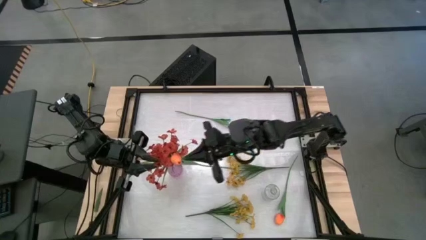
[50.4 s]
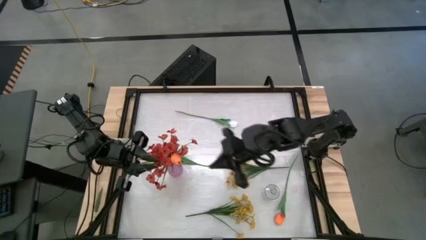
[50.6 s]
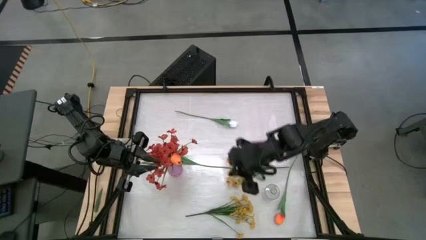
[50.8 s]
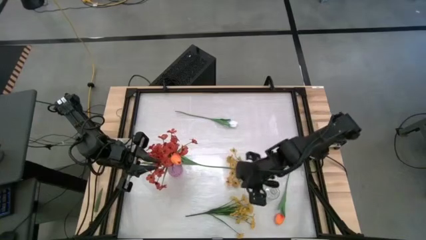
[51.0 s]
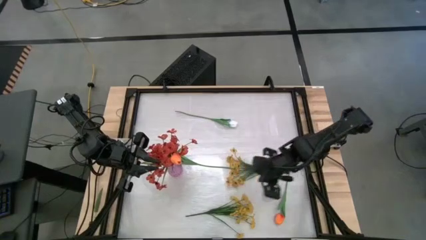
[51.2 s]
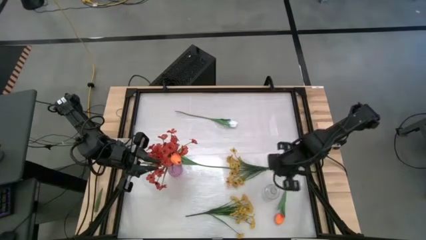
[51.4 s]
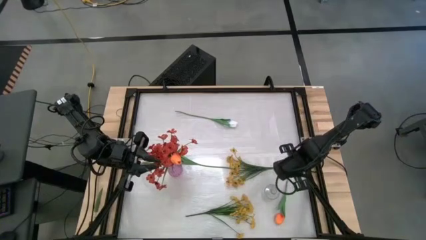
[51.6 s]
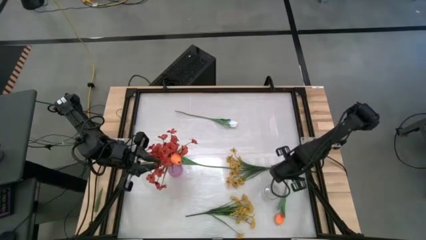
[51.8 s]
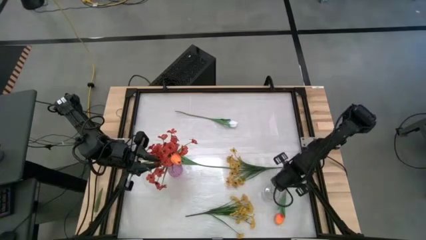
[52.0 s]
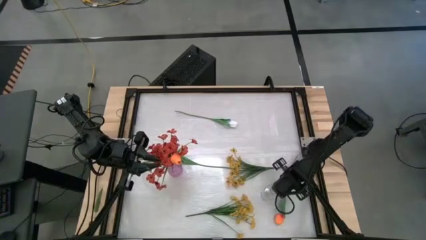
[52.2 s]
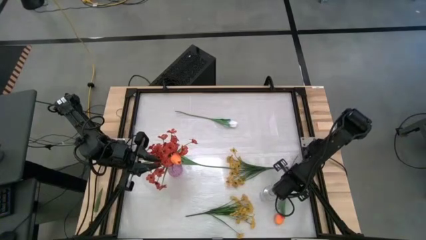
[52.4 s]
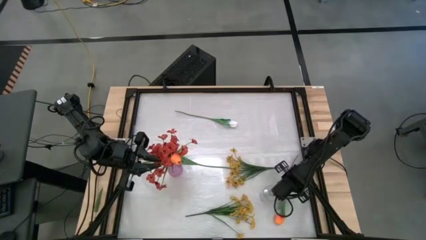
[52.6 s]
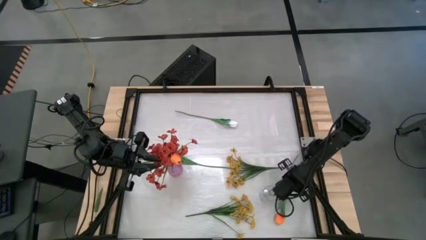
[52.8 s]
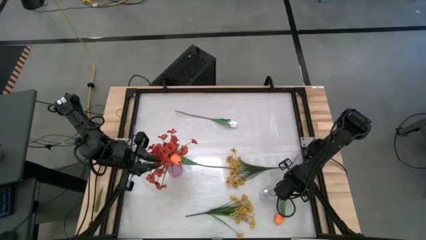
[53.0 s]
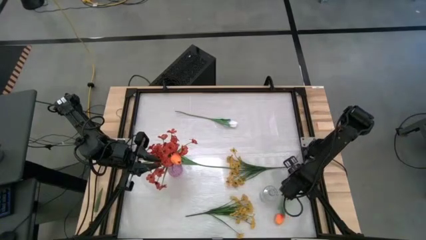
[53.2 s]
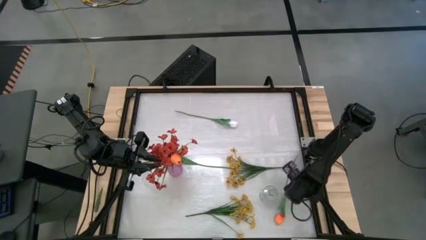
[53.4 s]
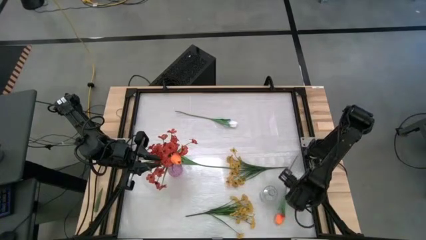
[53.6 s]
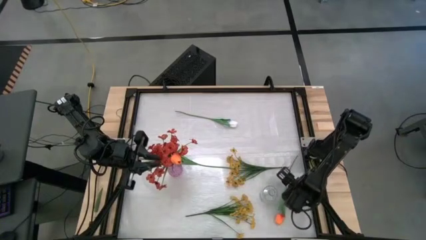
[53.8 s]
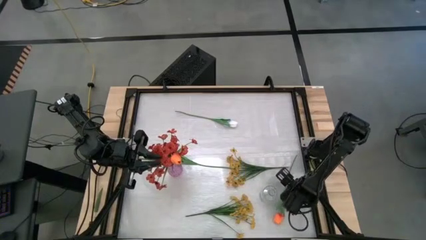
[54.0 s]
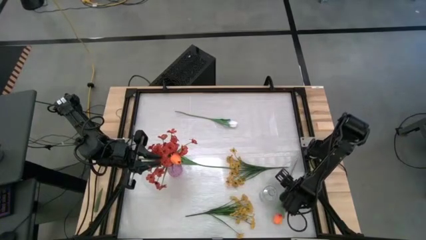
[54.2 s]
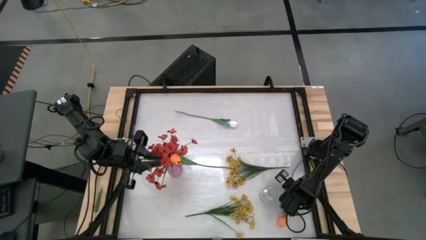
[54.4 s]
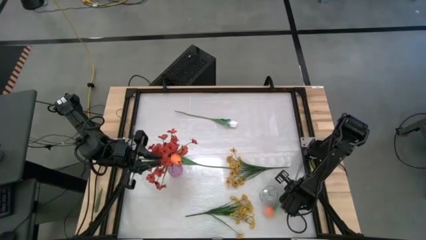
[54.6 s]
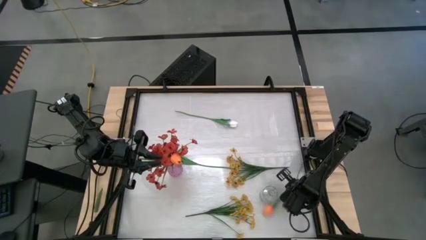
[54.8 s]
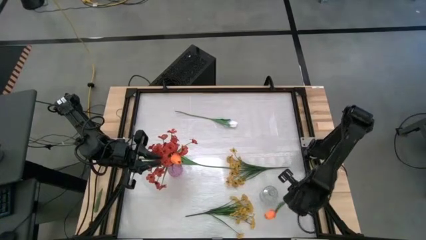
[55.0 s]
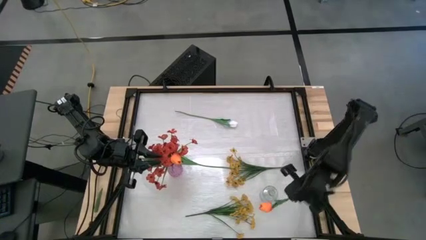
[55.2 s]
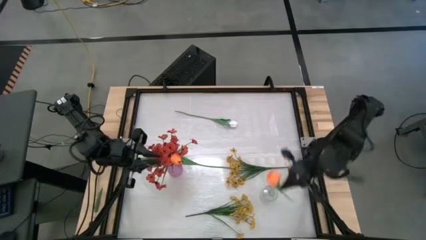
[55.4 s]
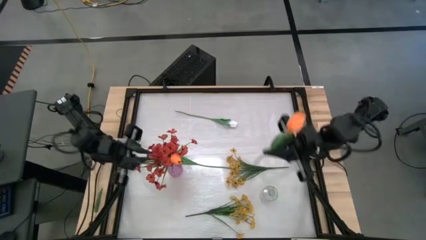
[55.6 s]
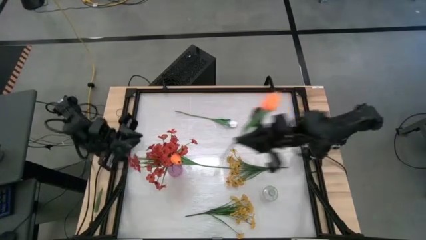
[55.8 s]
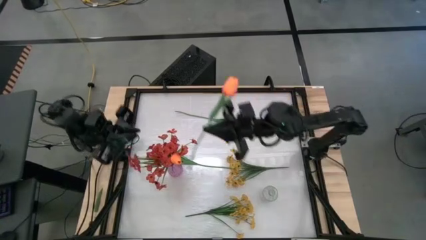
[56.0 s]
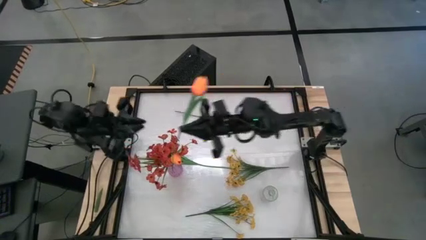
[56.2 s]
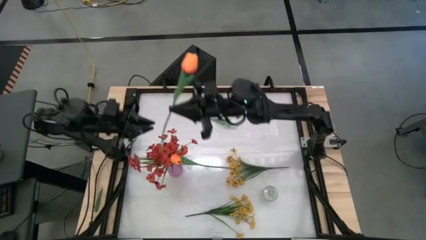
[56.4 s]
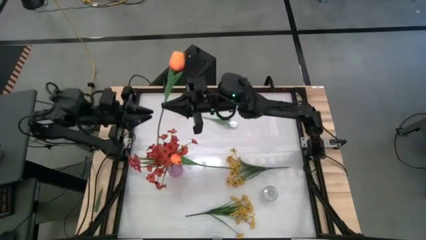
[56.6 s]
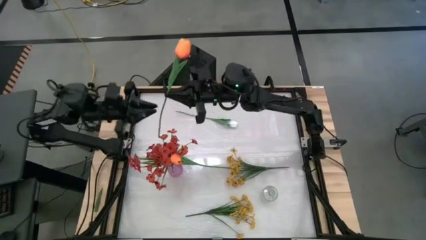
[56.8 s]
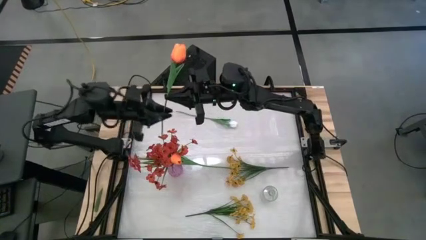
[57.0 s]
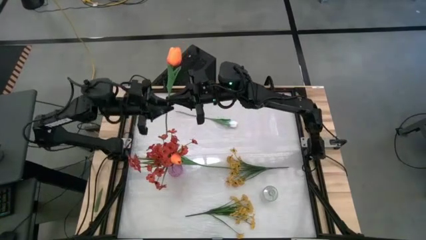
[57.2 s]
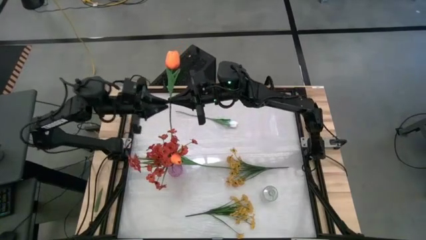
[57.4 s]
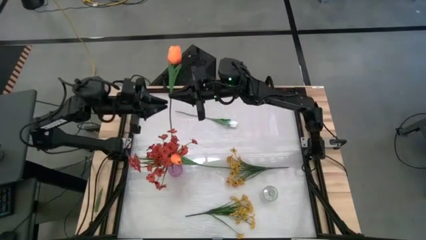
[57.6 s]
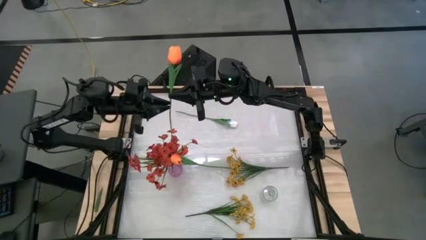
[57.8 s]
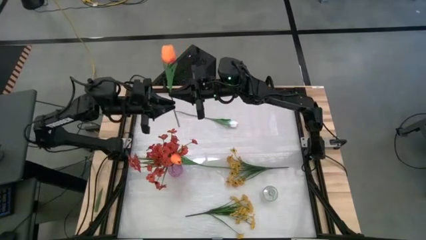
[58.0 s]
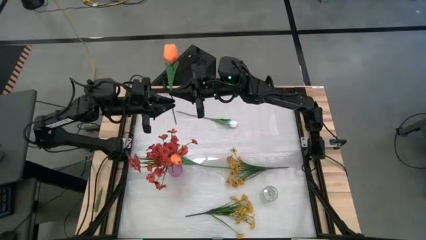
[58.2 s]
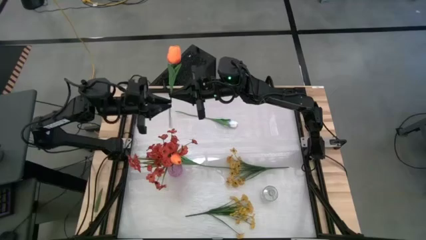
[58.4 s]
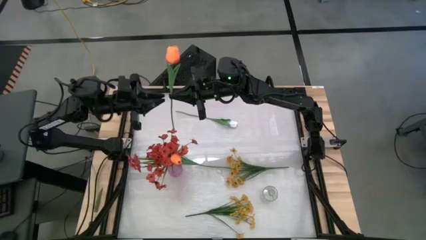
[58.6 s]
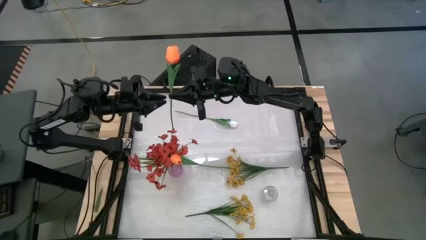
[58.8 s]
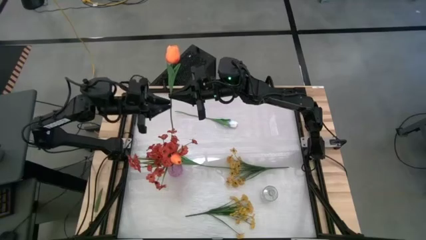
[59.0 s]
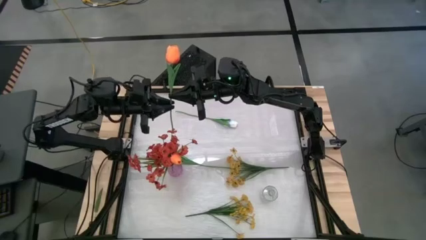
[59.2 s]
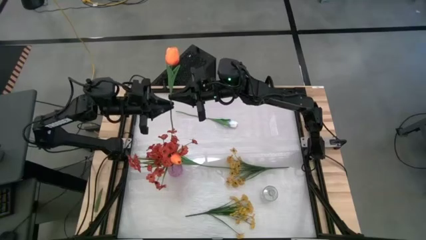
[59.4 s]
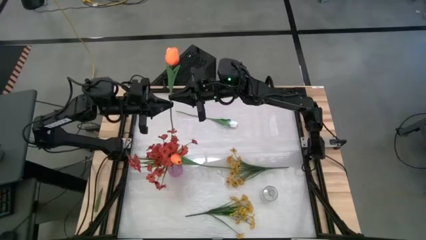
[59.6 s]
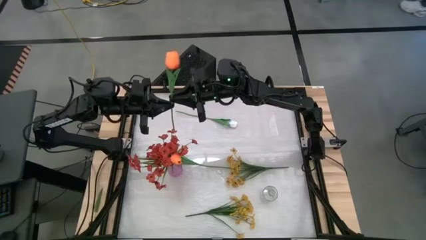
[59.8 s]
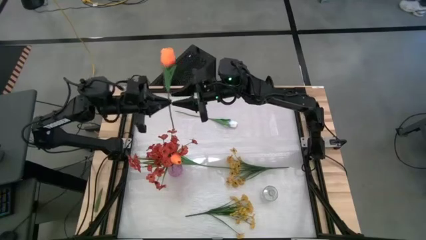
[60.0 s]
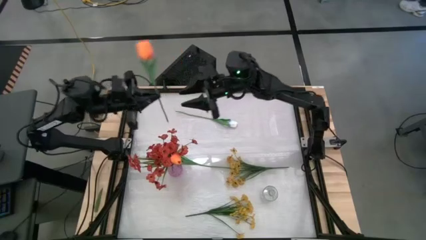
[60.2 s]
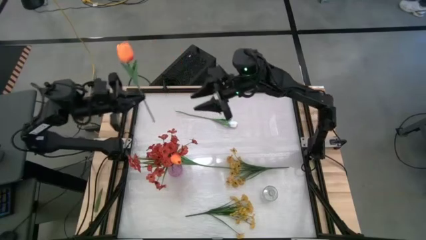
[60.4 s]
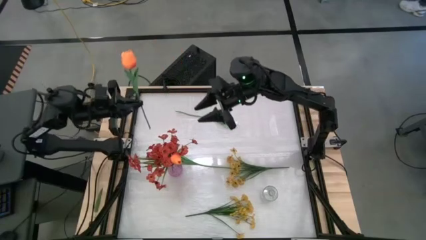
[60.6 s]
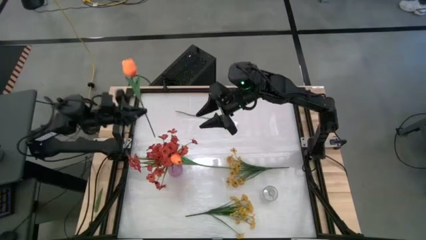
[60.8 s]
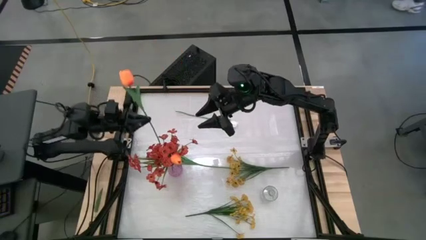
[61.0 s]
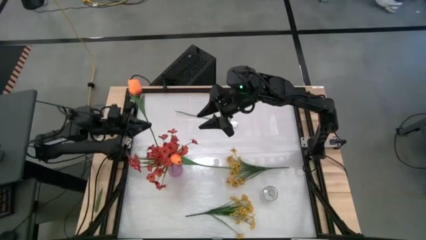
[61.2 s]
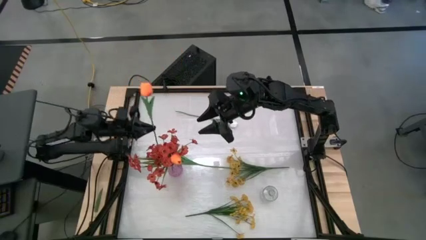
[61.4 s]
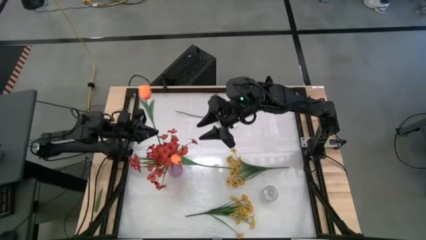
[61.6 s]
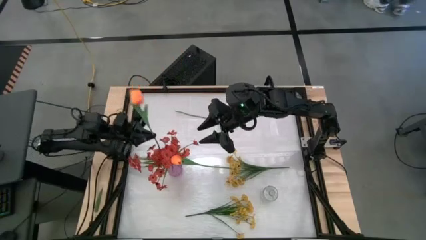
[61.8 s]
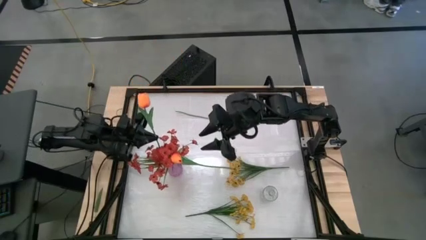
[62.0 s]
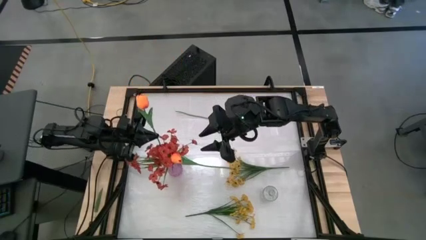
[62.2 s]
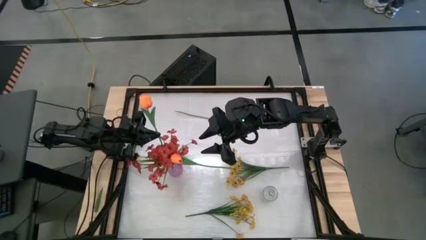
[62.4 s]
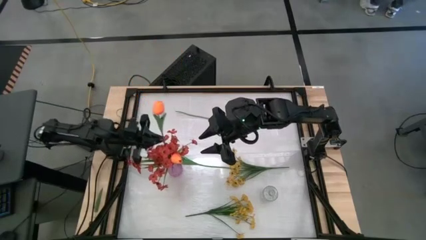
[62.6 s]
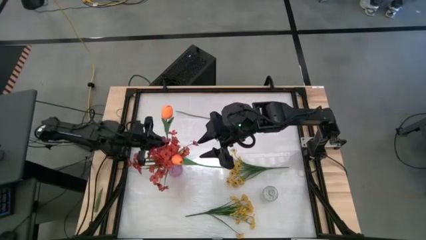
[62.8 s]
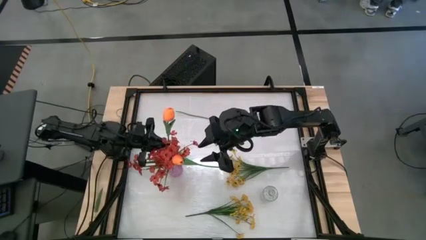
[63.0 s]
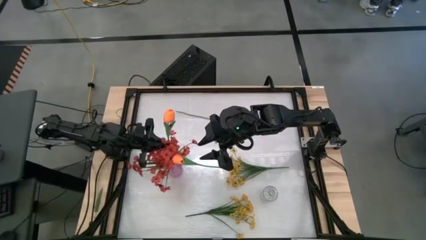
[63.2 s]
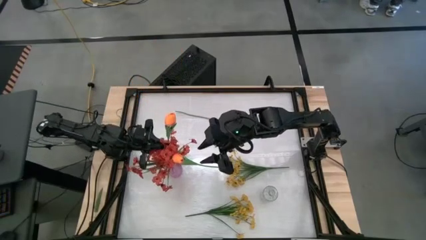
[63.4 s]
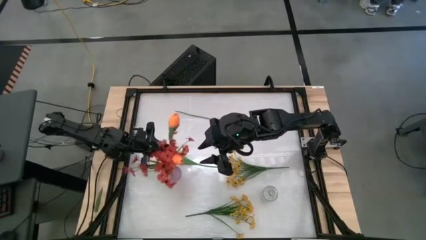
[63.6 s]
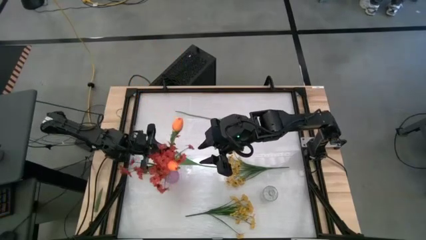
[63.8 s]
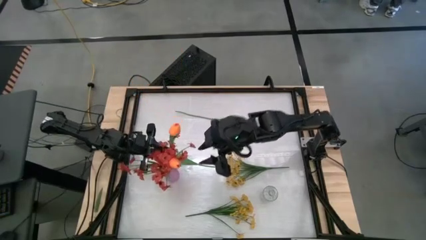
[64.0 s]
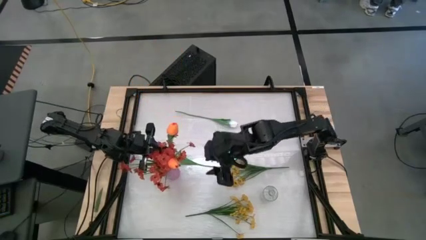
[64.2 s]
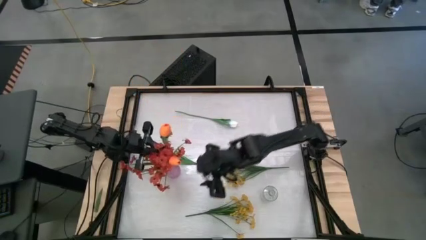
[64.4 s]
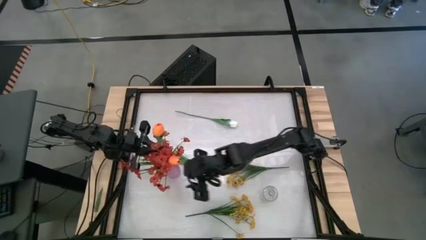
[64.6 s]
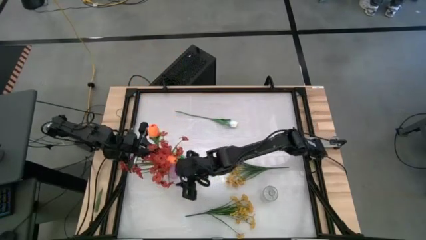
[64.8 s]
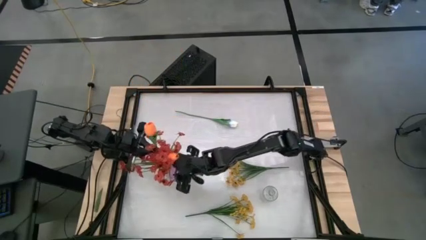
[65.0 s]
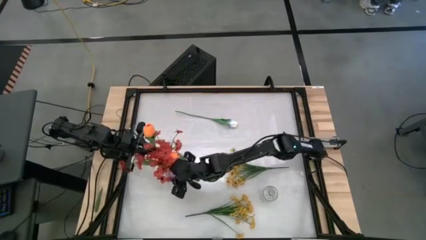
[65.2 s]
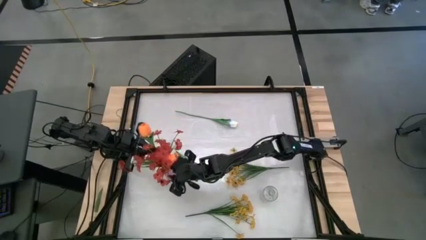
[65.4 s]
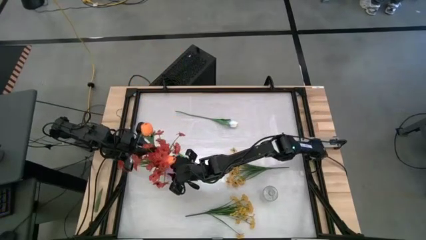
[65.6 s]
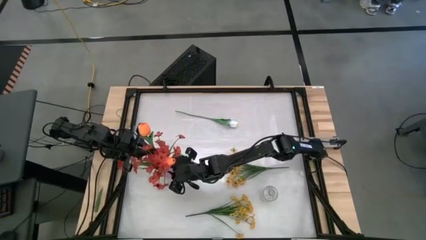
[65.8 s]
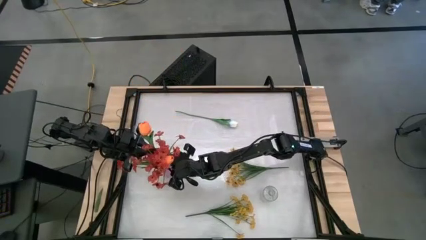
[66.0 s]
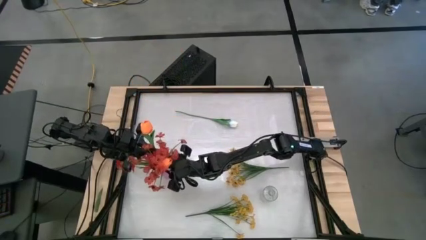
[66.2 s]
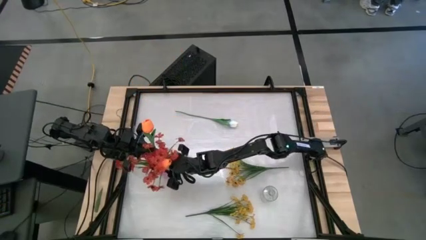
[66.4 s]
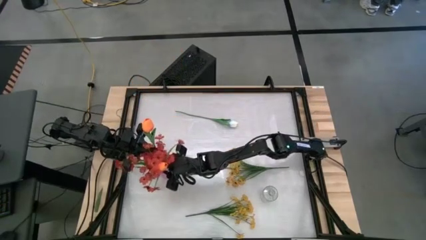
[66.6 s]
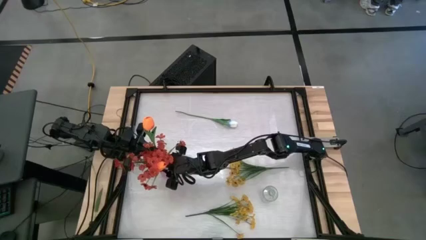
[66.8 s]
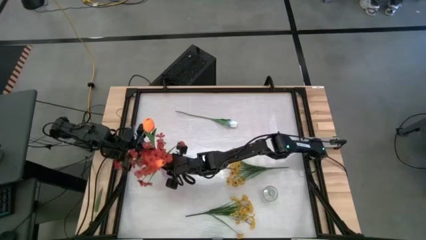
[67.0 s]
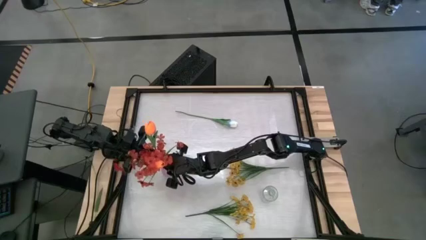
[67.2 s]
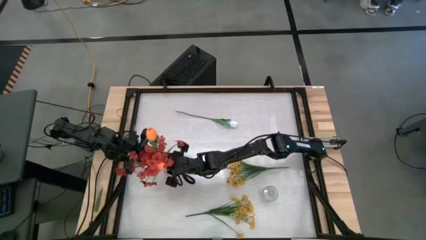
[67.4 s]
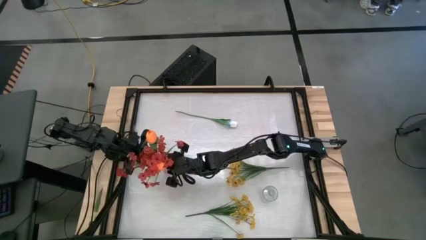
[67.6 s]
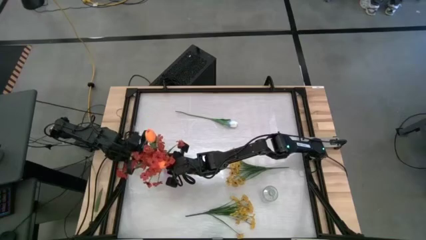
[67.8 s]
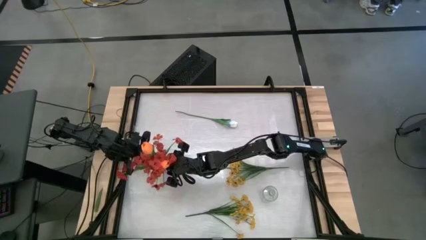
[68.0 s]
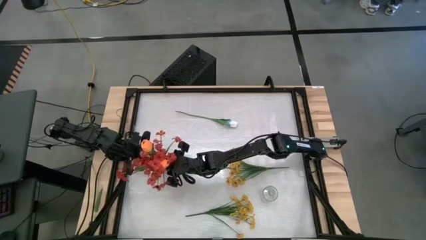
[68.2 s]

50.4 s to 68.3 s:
Task: Sort flowers into vase by color
Put the orange flower into the purple vase
